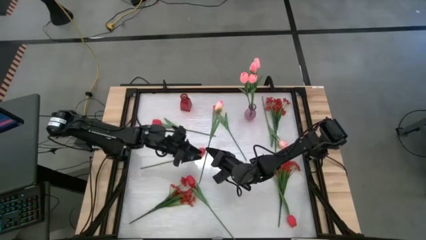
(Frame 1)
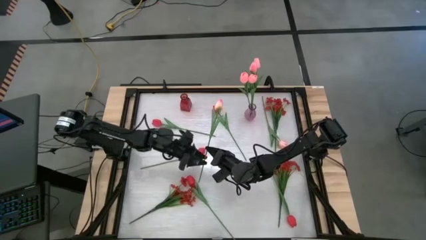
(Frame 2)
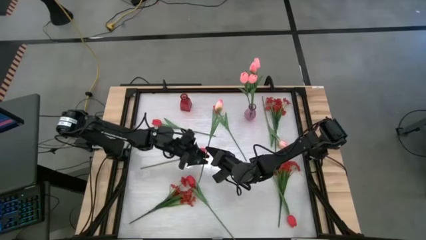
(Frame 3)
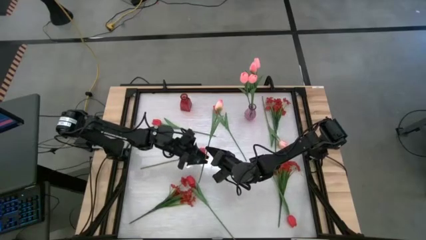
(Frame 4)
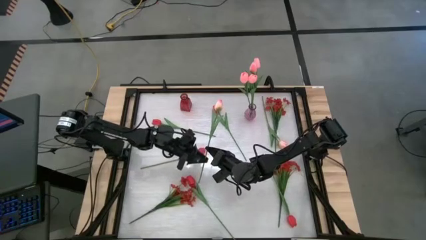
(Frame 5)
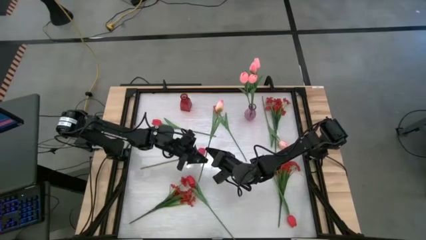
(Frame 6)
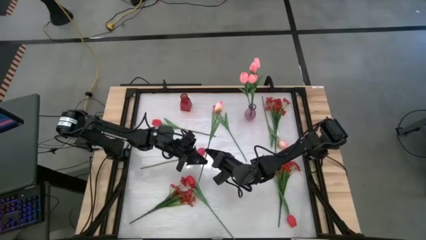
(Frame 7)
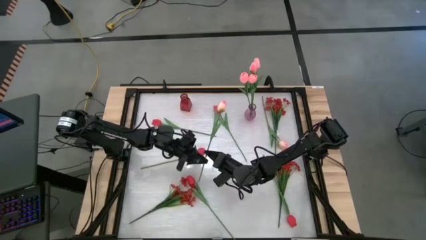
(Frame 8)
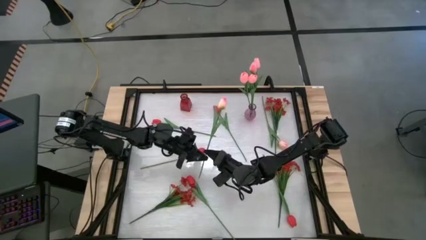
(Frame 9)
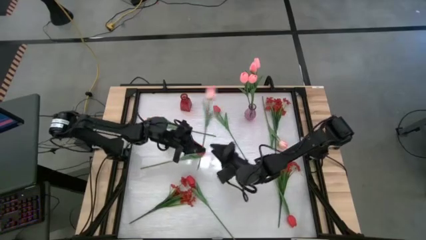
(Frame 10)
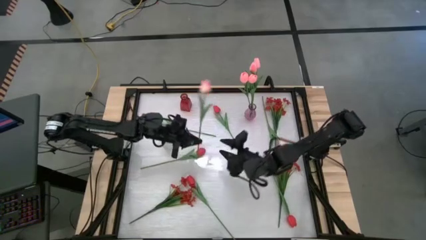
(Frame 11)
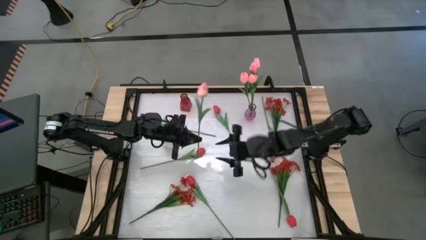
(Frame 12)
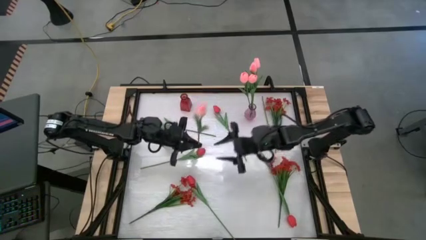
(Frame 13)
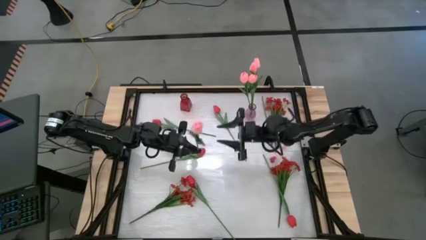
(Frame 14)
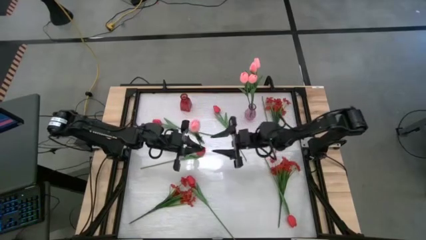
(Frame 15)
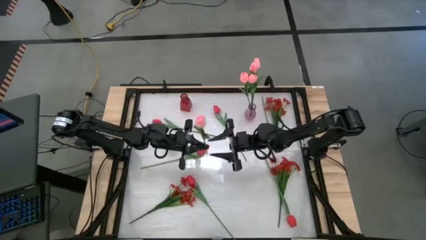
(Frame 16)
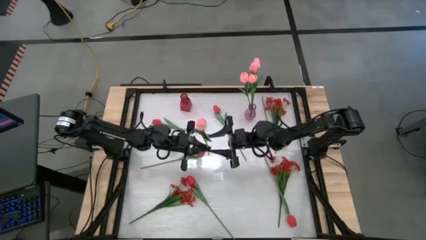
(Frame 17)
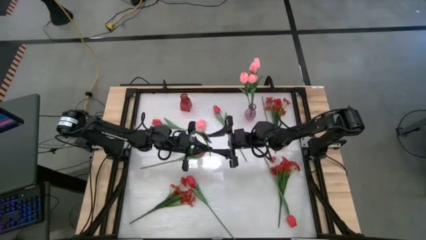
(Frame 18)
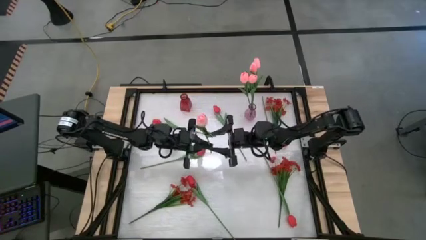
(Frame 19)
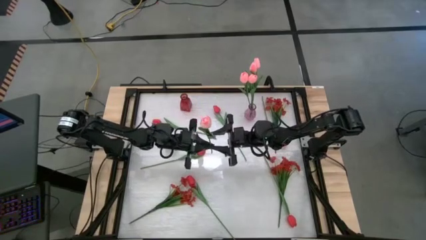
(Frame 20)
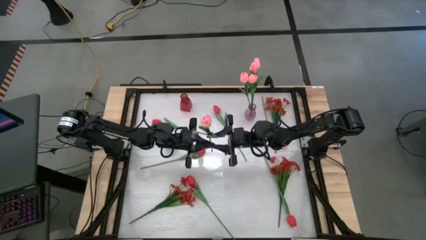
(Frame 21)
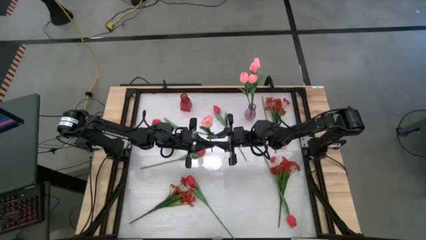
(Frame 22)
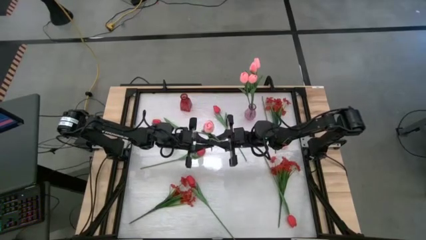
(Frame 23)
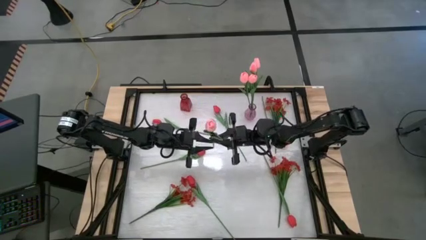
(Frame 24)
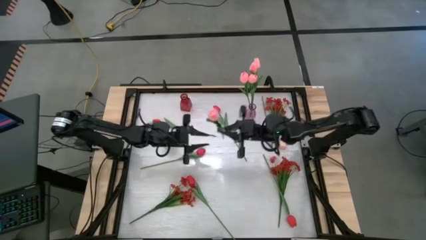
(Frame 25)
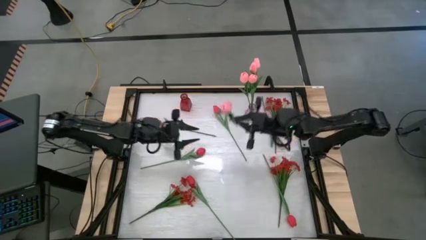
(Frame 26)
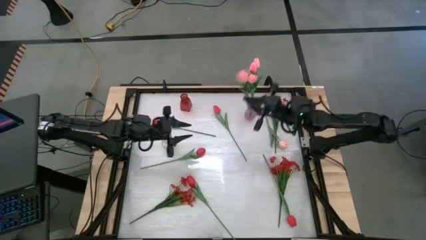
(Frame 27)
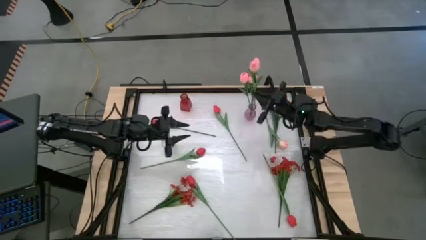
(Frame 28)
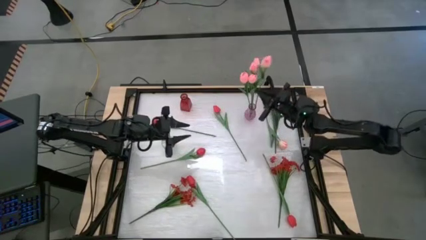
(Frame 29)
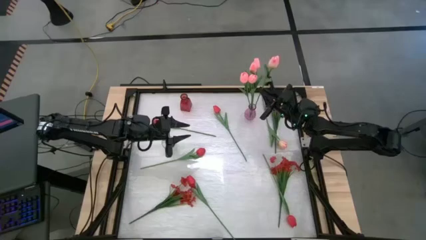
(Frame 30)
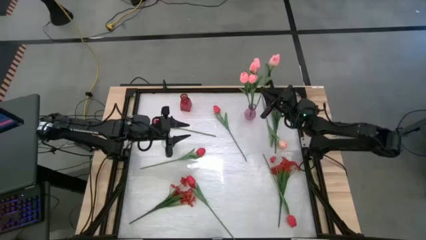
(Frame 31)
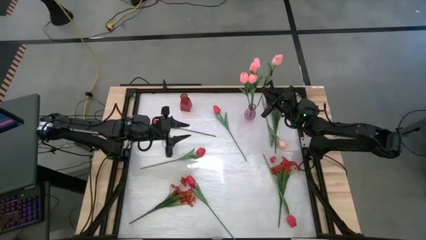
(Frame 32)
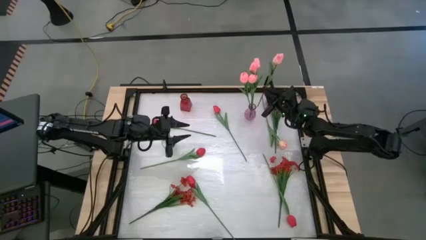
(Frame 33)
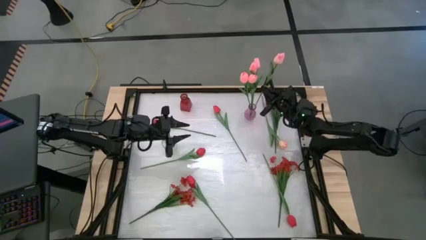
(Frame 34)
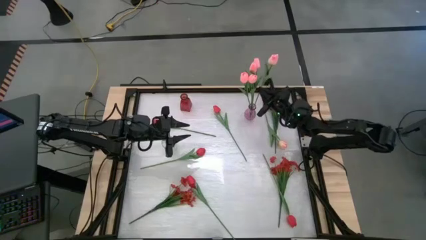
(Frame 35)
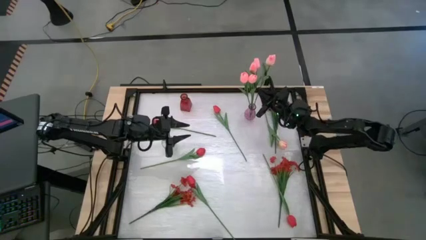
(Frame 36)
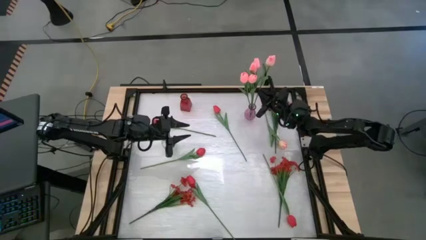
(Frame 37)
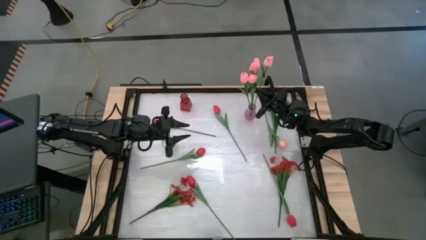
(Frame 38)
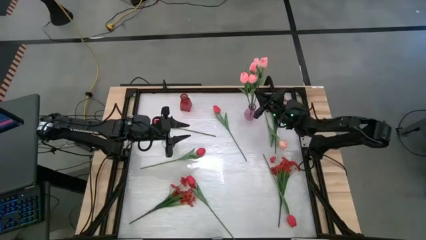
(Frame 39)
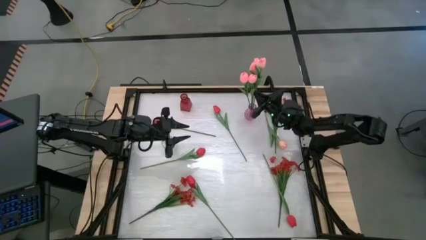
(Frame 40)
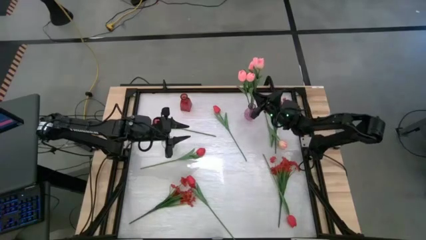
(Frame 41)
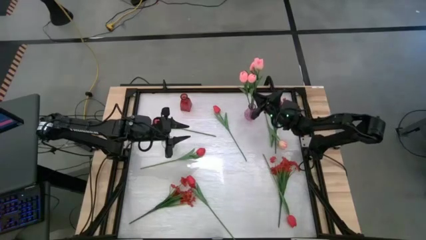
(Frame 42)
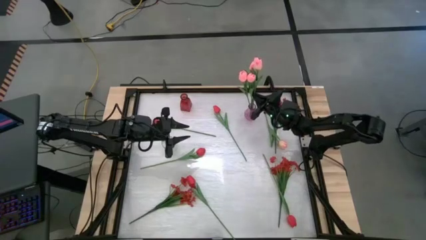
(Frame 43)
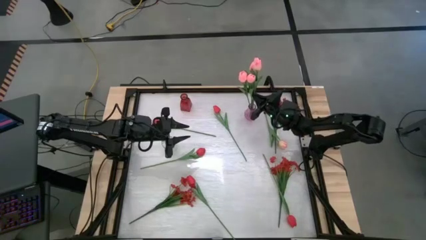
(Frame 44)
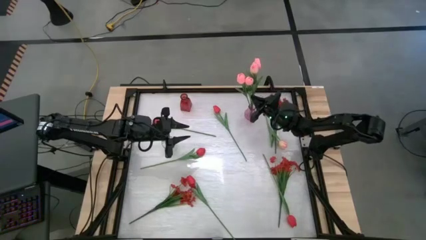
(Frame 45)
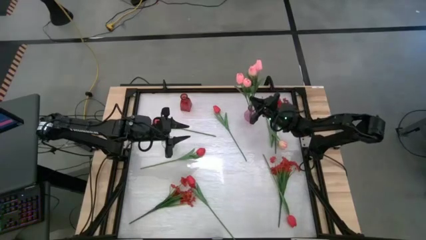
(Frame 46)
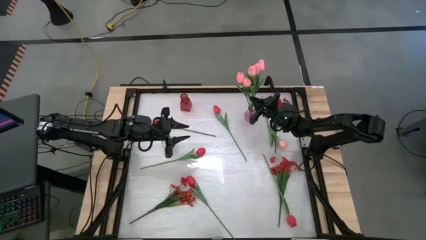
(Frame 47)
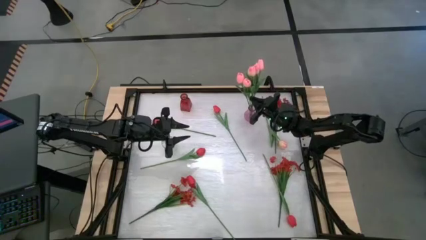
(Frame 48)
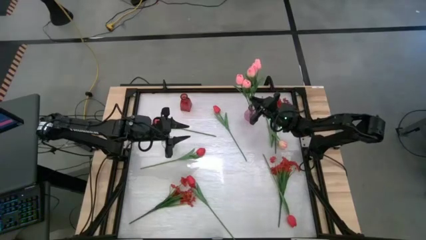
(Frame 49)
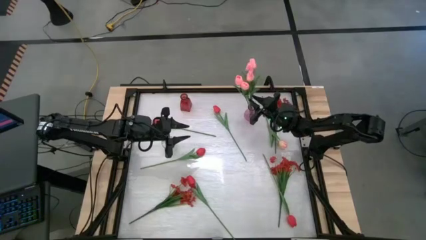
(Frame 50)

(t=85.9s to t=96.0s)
Task: Sort flowers into vase by color
Put the pink tulip into the purple vase

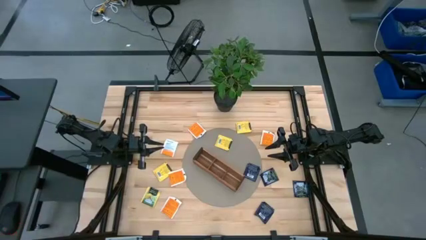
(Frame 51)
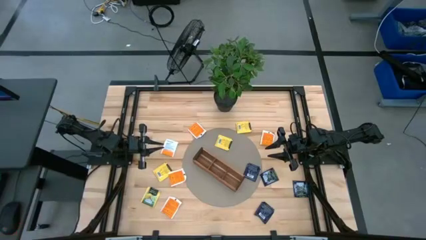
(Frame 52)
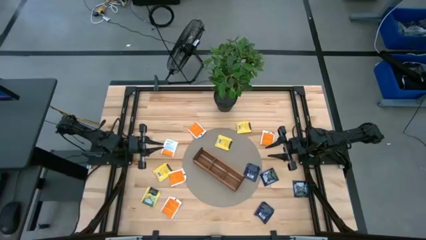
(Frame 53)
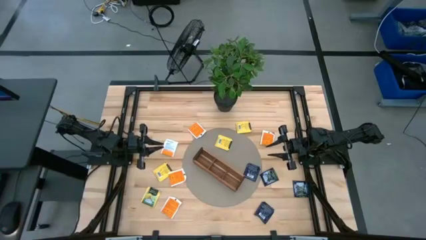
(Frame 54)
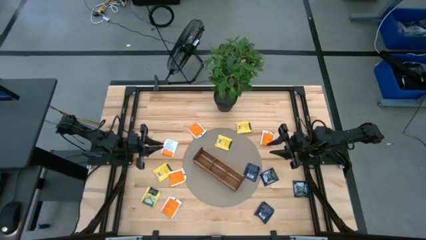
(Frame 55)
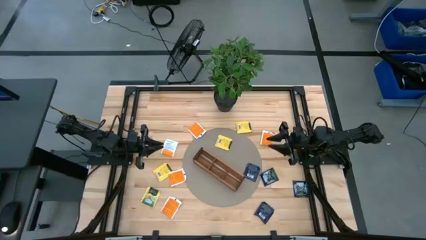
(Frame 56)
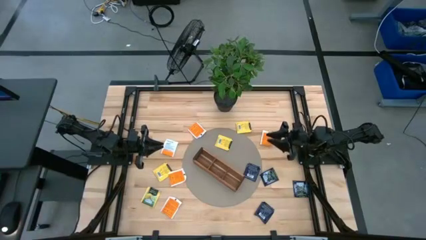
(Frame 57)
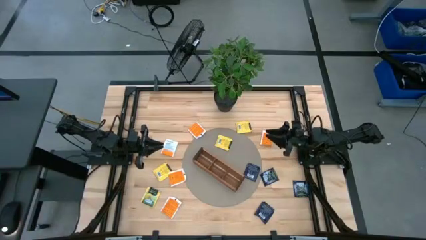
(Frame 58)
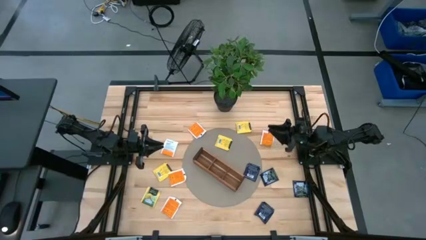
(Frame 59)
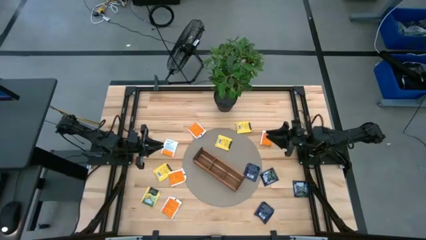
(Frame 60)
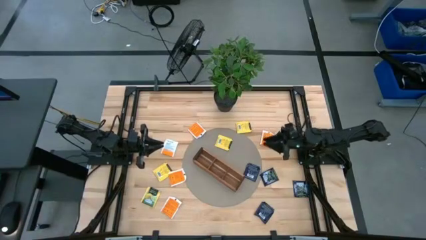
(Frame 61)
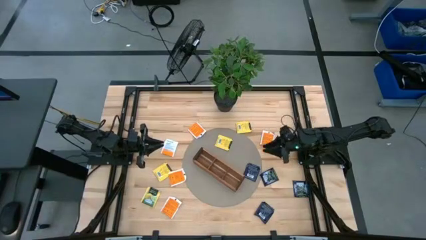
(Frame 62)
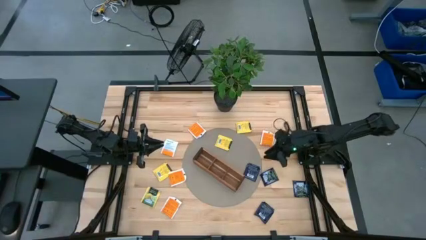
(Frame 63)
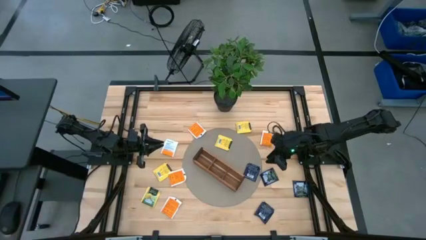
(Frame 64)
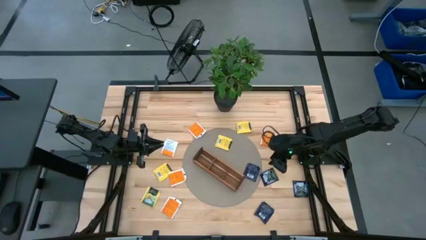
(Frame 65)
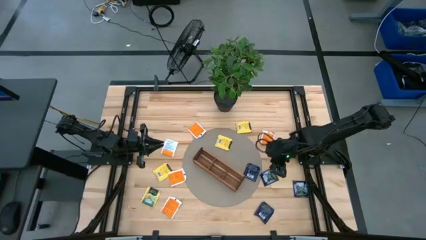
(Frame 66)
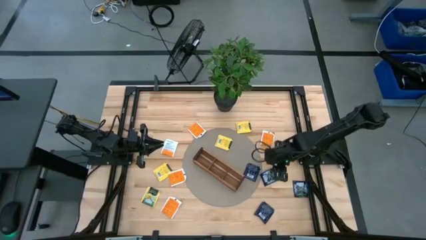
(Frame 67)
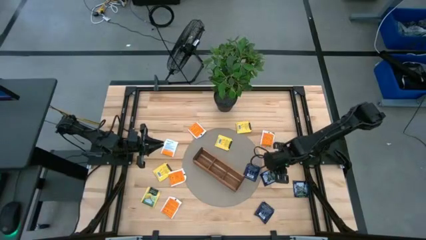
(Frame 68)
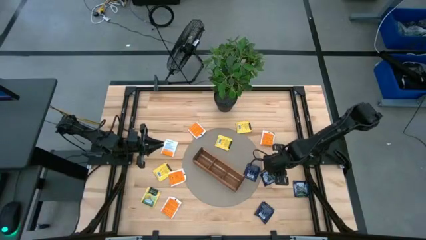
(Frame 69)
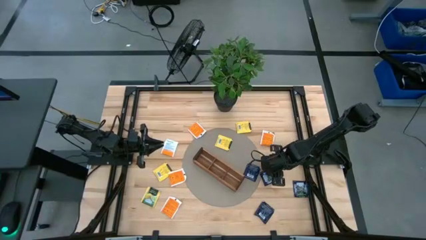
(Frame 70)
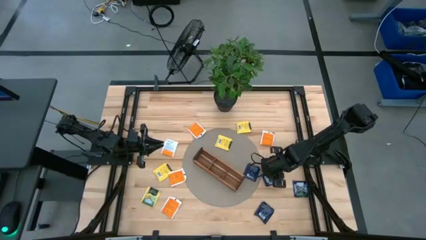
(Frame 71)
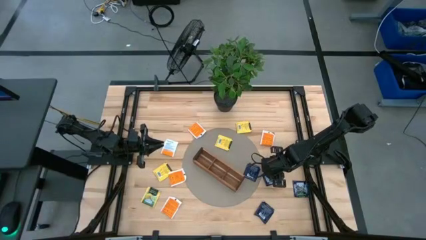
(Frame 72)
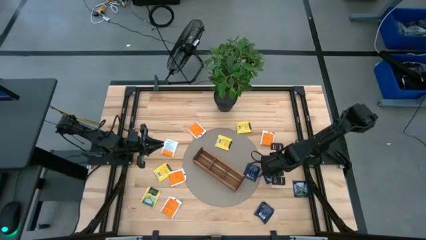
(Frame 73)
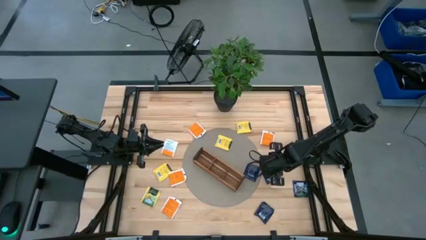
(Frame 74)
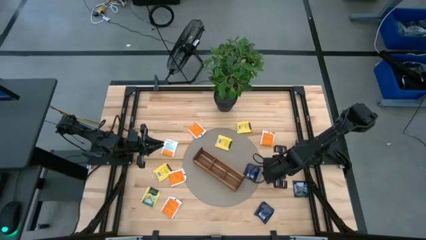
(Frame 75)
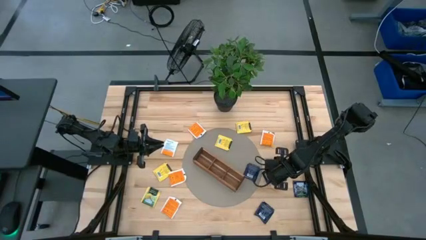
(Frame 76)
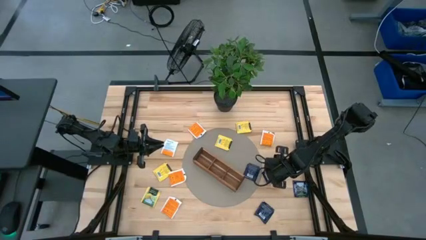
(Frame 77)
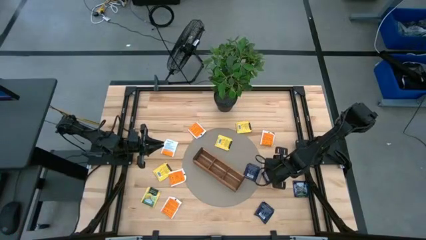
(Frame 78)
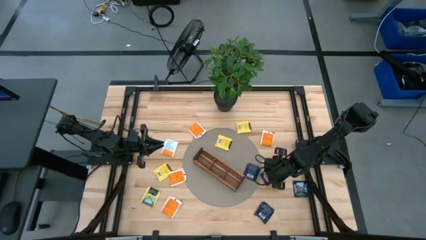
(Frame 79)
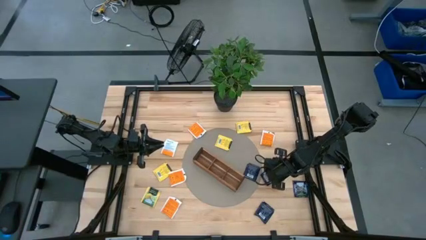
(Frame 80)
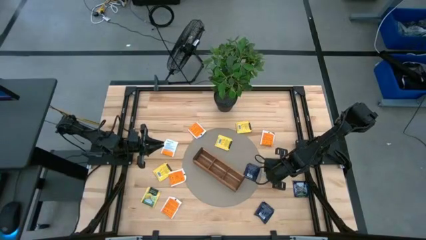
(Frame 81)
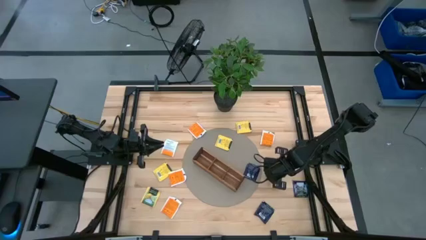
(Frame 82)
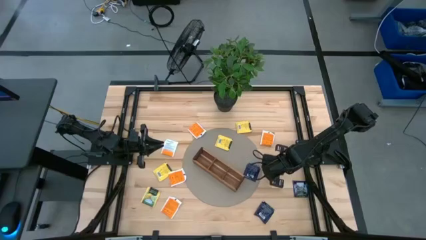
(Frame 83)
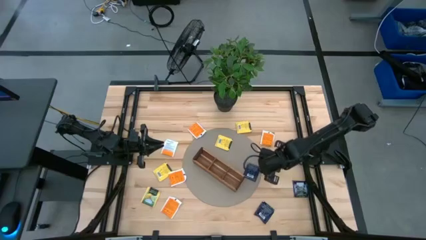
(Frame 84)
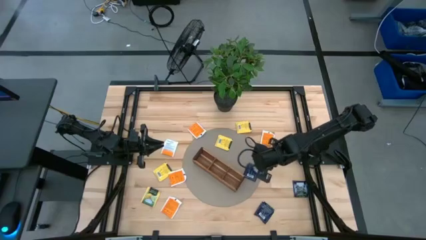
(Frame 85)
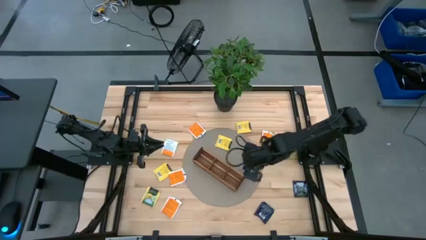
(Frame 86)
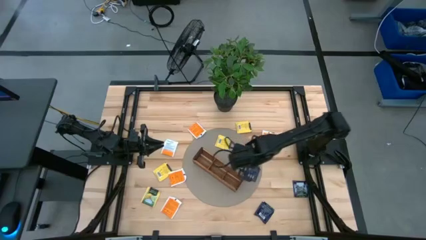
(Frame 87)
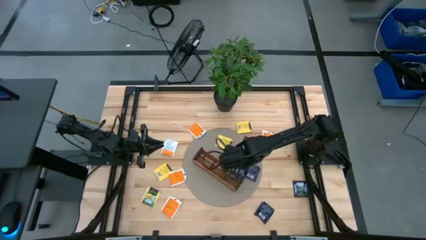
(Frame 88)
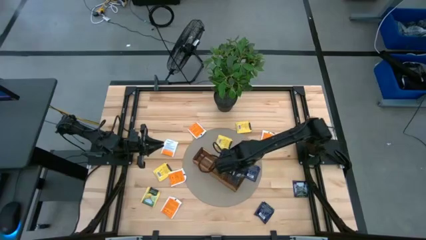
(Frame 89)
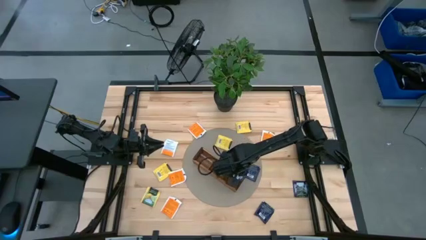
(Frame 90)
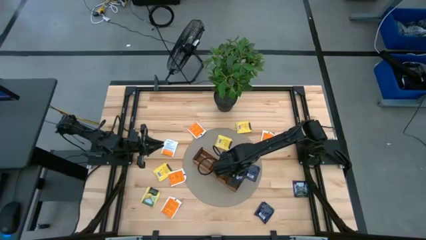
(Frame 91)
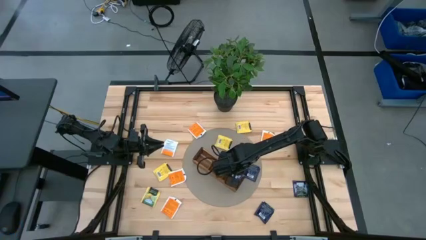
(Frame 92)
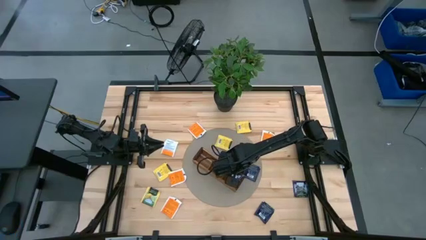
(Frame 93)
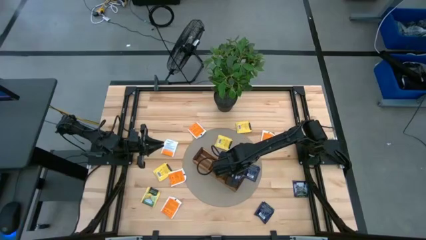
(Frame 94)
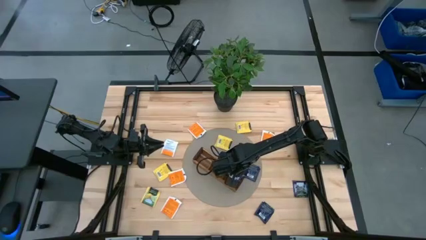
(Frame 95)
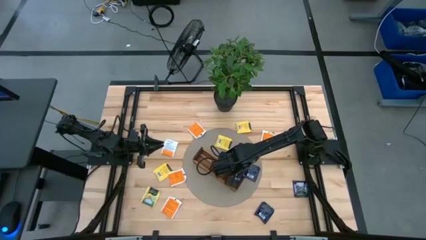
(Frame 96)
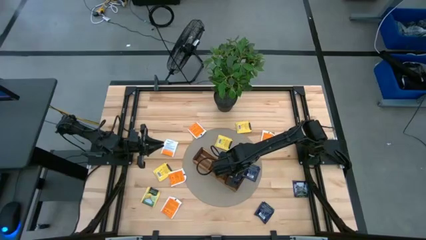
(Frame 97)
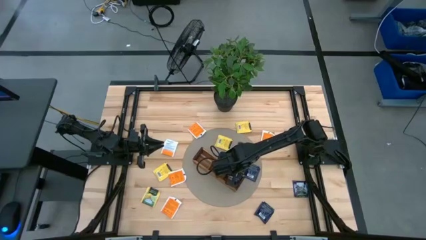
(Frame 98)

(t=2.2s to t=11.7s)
Task: Pick & Place Tea
Put the black tea bag into the right section of the wooden organizer
